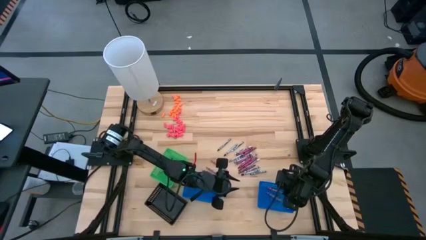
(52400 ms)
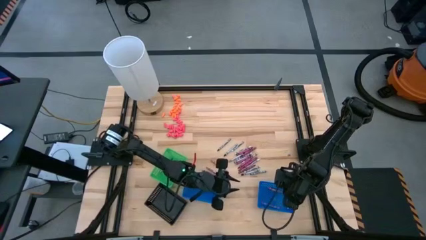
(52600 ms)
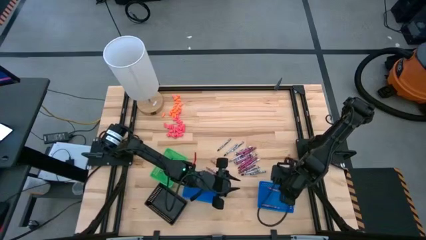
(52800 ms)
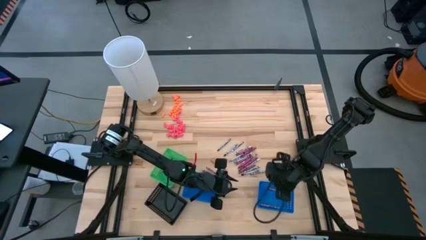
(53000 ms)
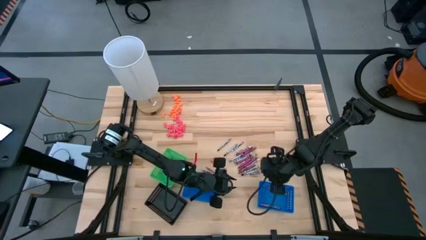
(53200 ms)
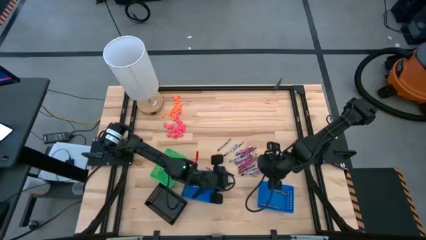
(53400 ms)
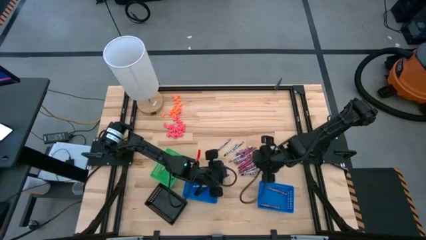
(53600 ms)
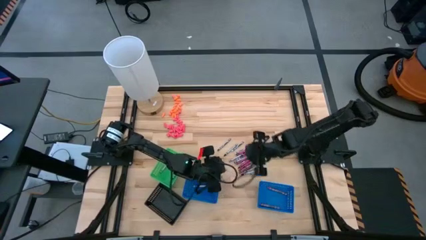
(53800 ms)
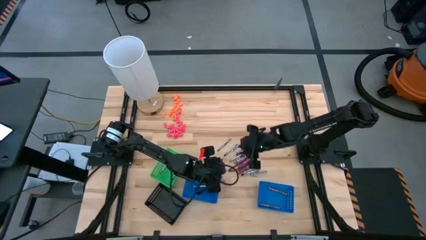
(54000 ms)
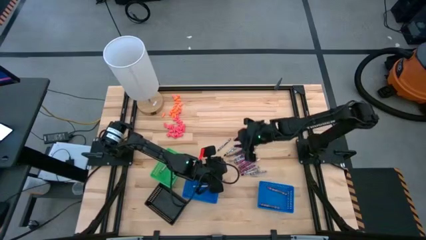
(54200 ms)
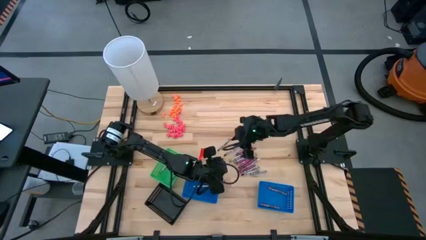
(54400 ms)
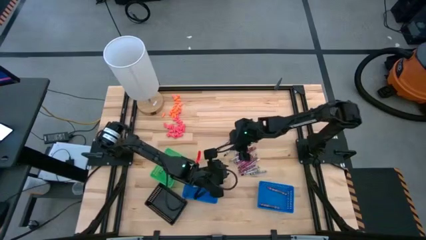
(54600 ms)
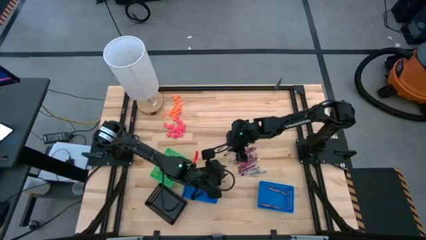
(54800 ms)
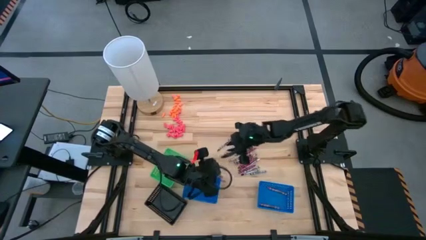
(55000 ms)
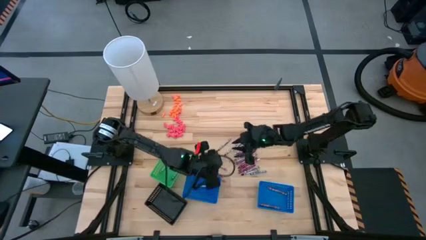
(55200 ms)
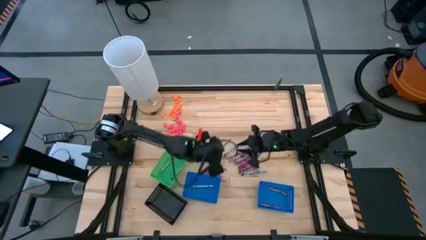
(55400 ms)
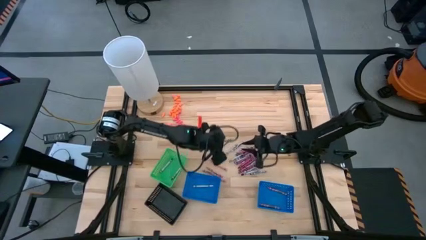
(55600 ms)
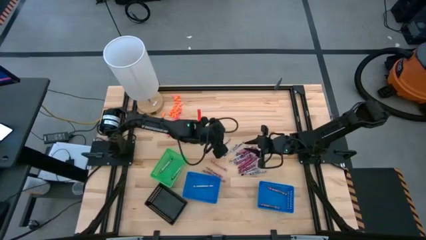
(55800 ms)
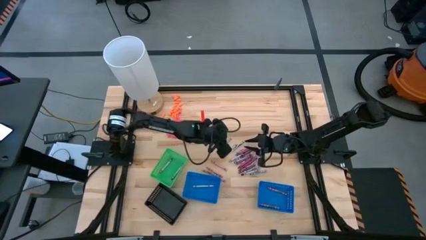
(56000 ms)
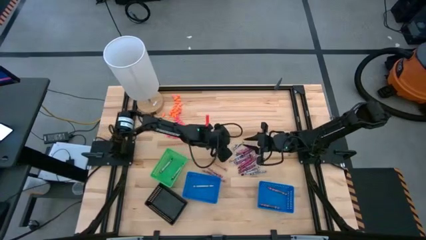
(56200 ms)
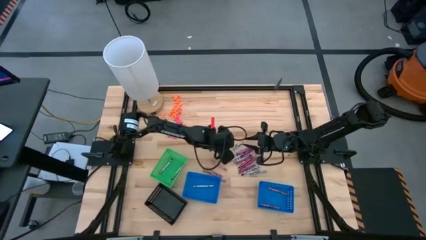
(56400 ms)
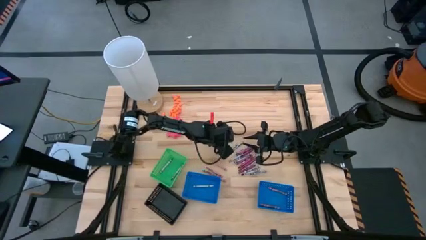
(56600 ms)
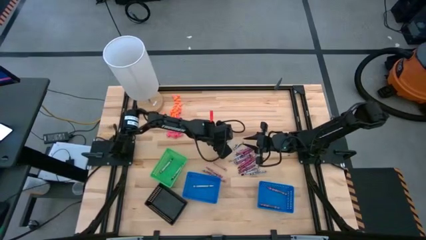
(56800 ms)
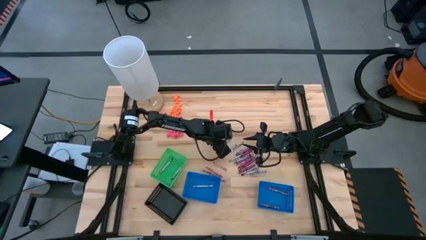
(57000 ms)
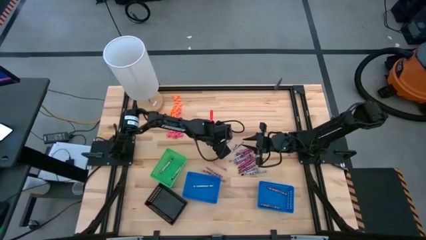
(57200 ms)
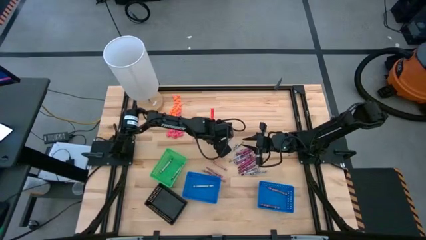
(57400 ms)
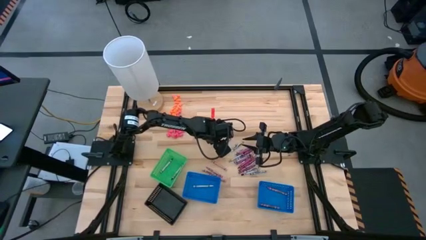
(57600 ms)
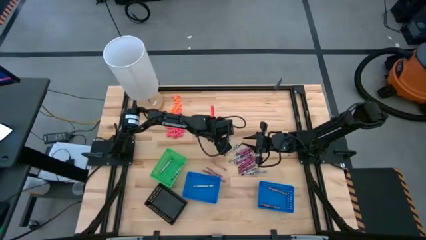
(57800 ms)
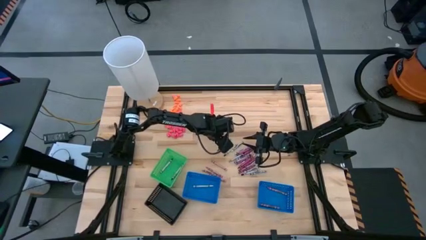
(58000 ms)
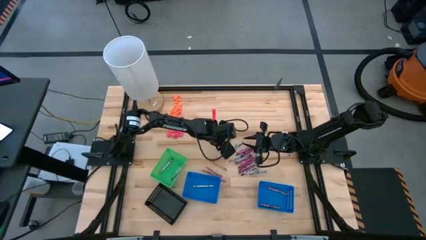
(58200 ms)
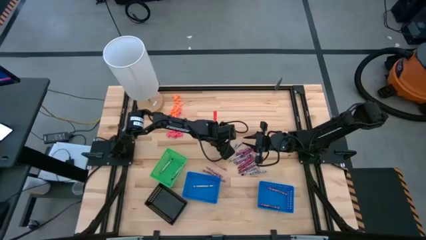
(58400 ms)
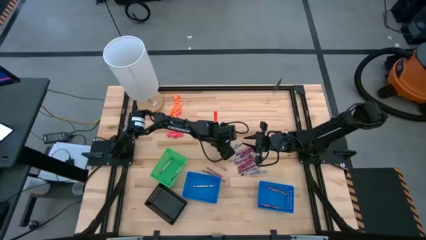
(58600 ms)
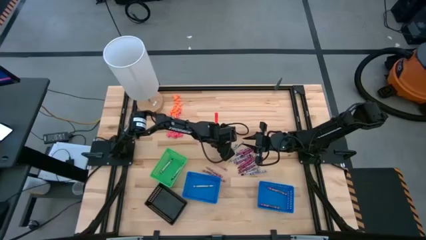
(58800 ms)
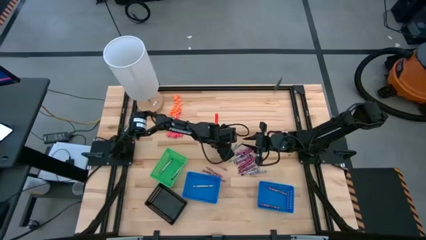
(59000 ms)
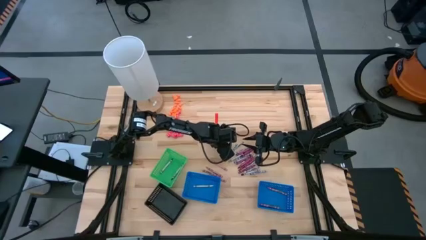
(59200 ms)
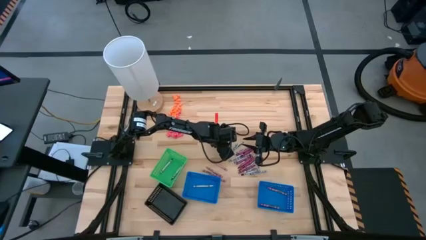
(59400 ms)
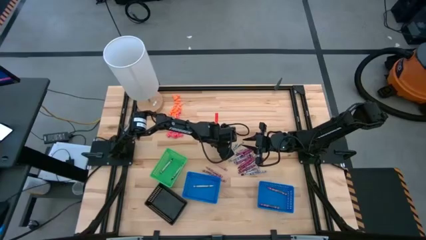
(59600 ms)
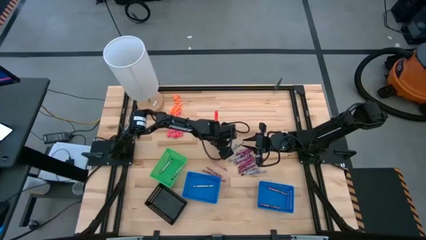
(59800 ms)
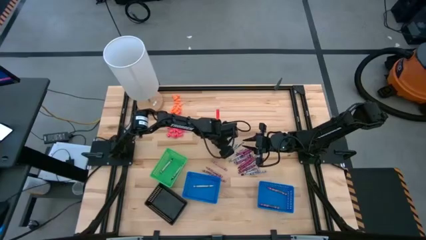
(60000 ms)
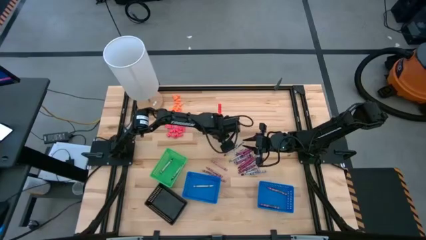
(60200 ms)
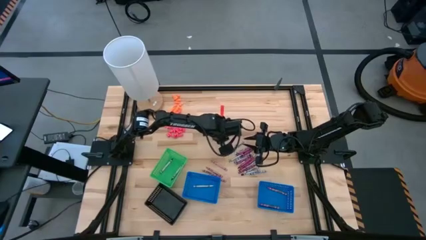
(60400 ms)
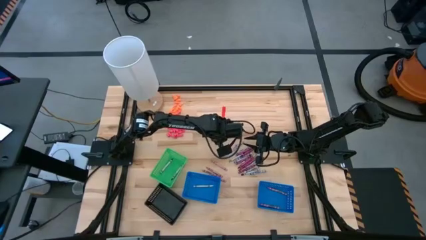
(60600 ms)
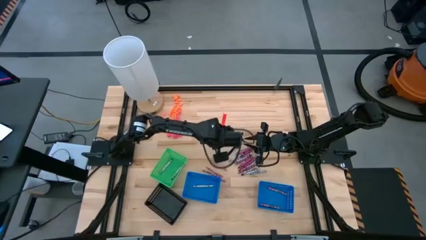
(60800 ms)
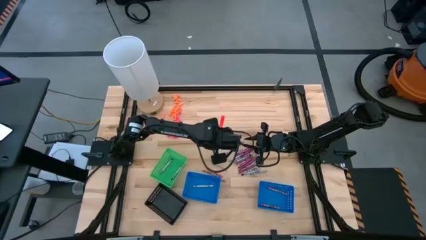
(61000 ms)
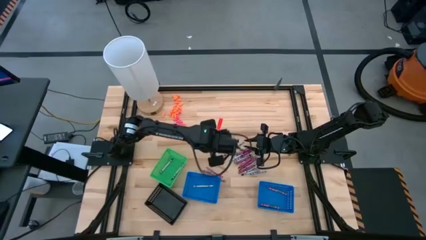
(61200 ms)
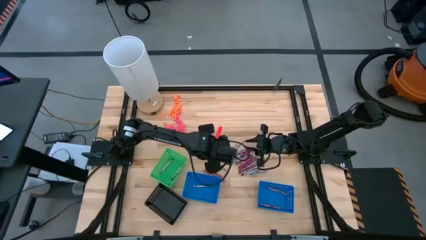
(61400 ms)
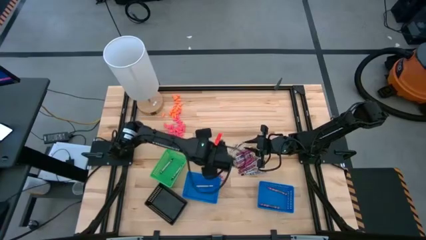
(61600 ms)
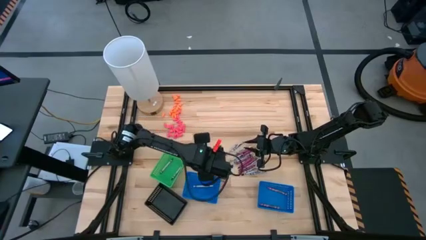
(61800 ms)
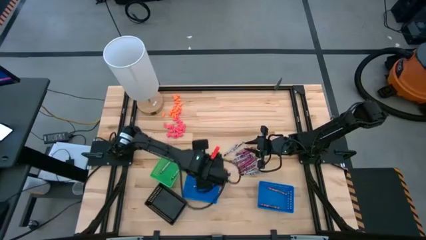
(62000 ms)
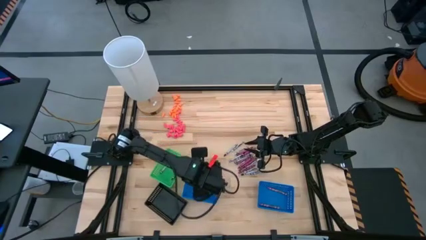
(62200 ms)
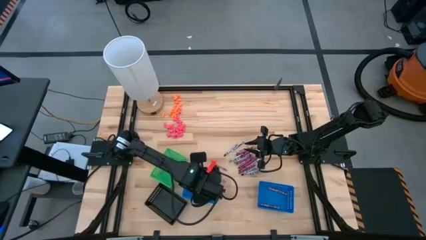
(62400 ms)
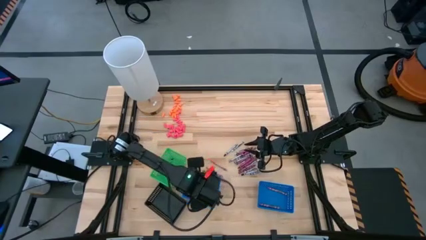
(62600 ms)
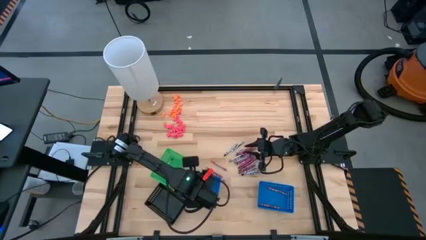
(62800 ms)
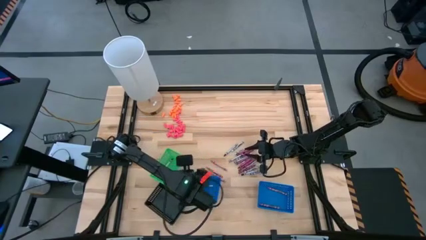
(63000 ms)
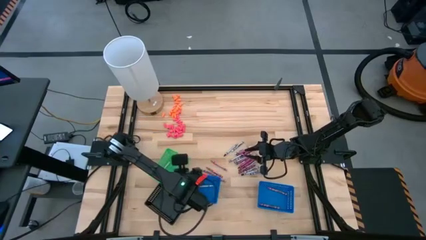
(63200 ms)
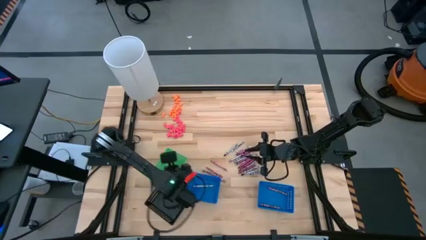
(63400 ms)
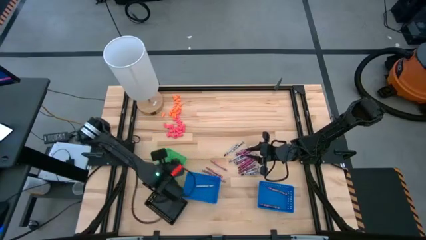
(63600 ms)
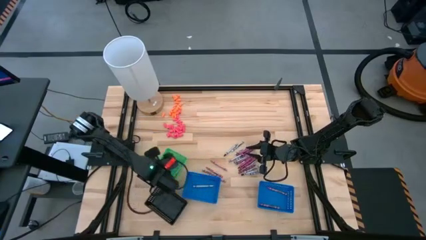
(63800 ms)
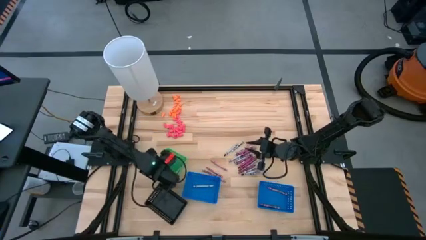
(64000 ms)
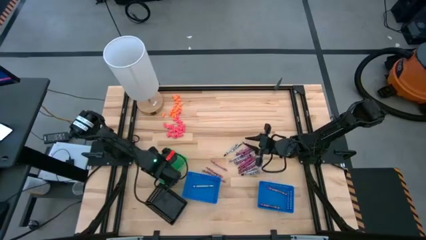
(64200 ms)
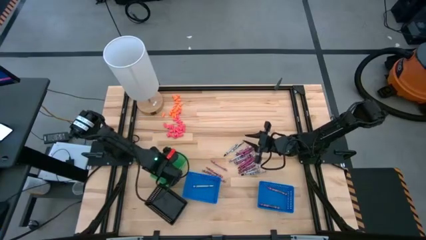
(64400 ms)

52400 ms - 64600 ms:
Task: Sort crayons
Put the black crayon into the green basket
